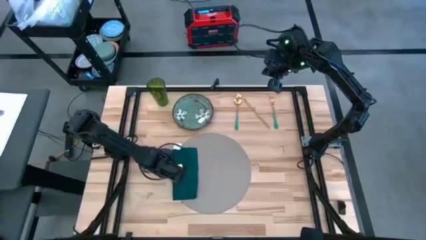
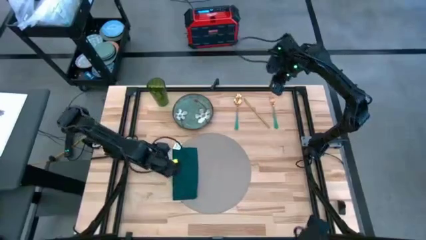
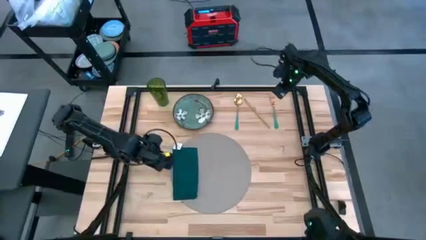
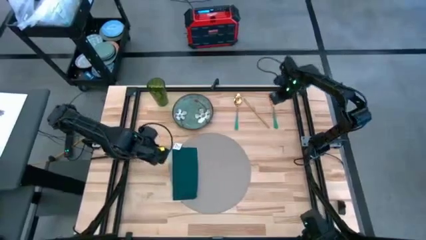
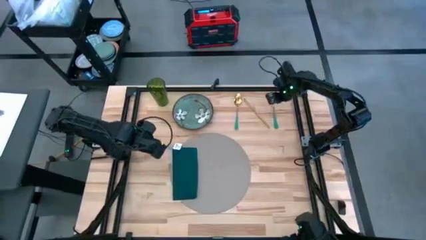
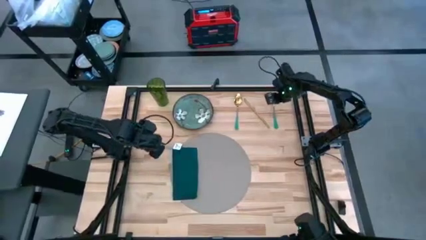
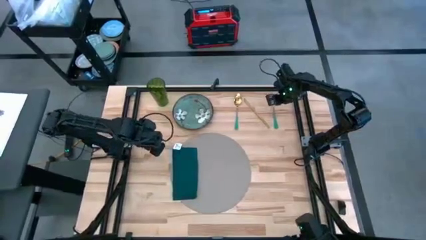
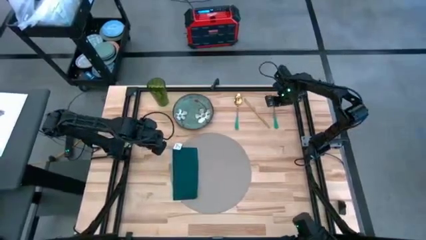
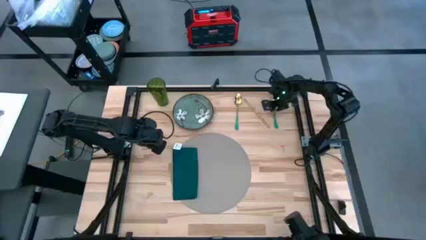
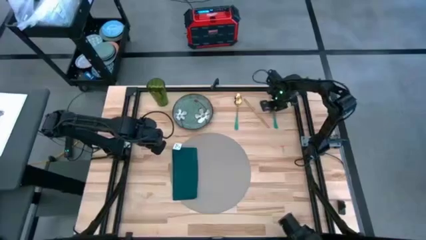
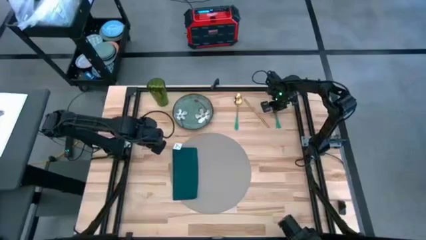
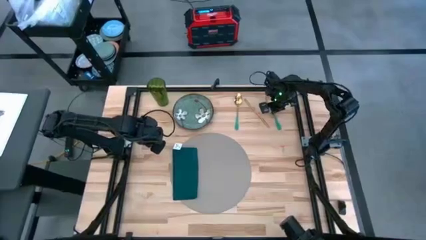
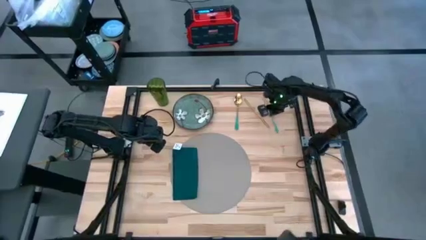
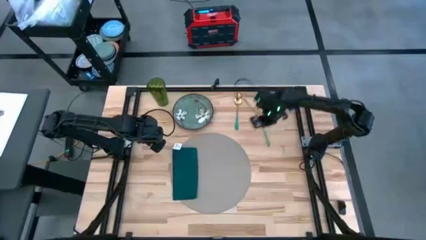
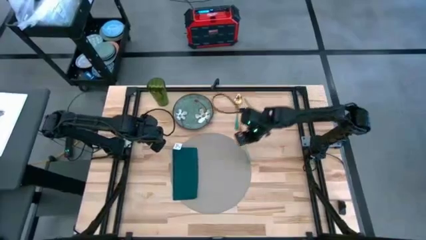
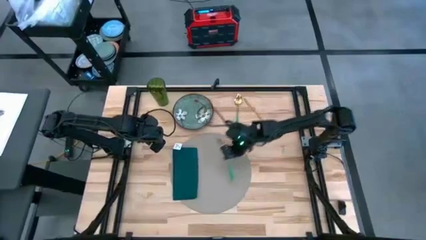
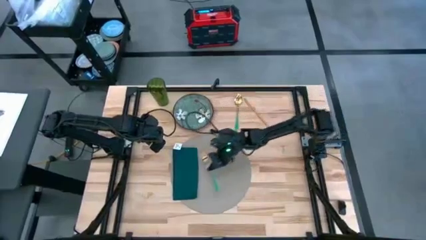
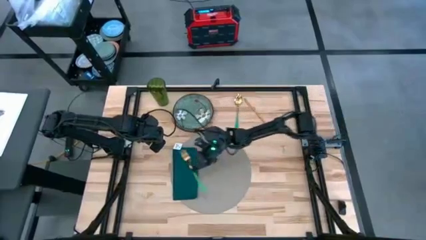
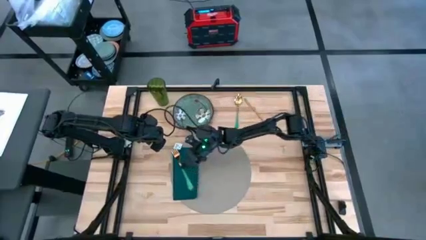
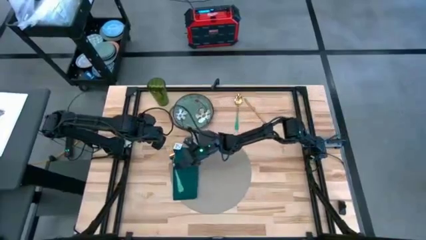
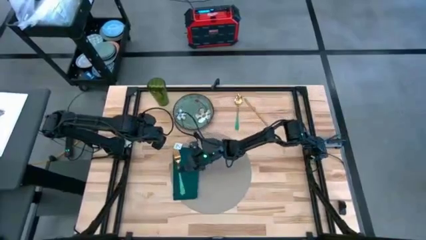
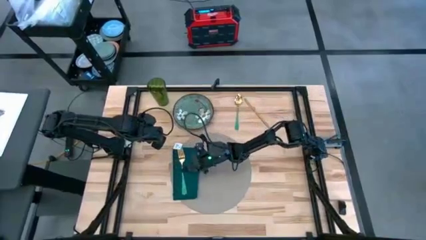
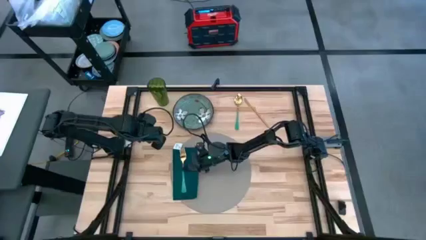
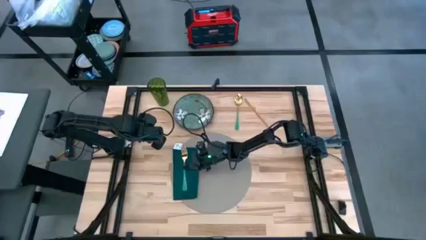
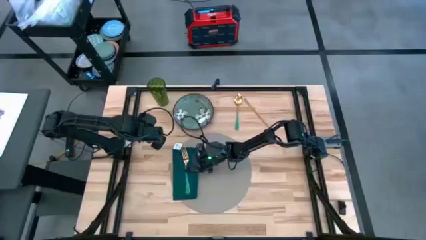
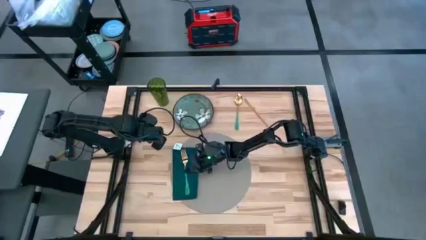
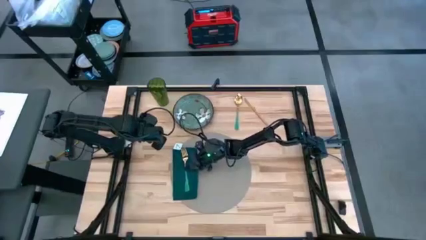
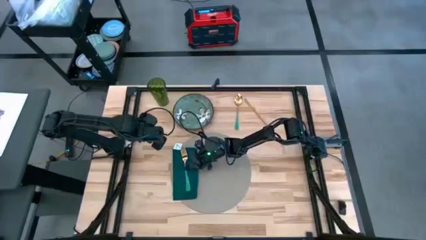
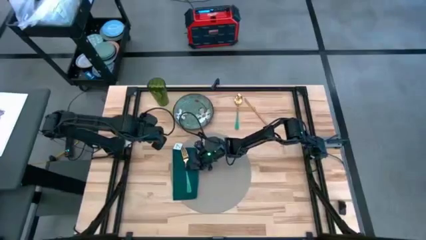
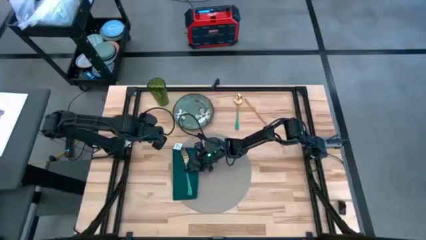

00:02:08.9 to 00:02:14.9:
Task: Set table place
Put the green fork on the green napkin

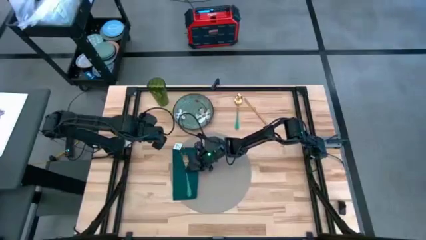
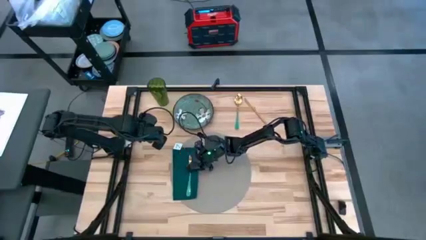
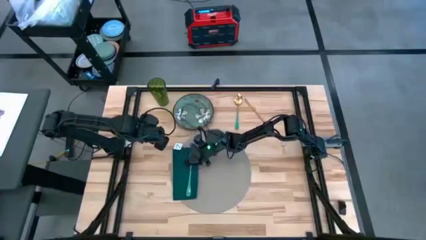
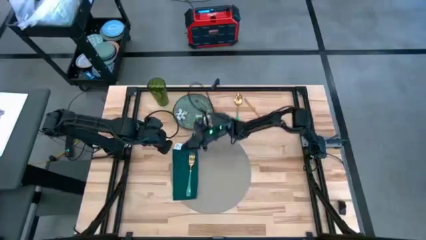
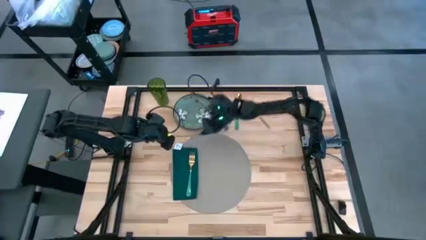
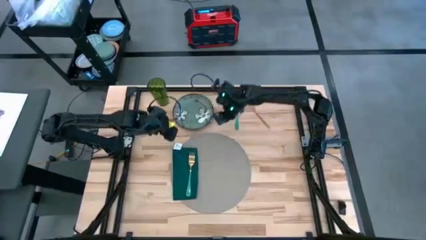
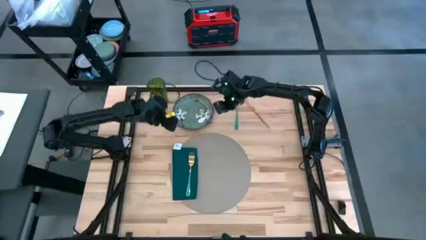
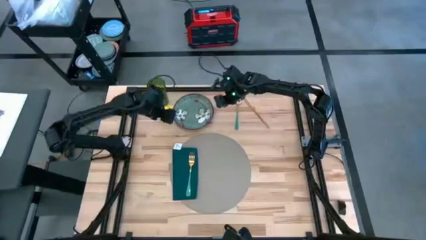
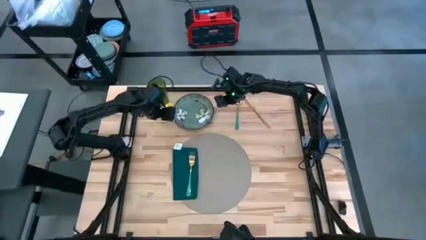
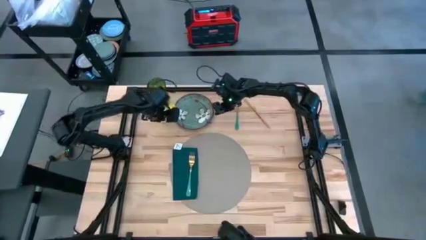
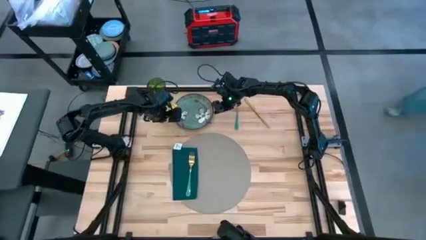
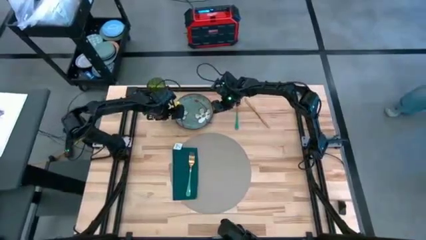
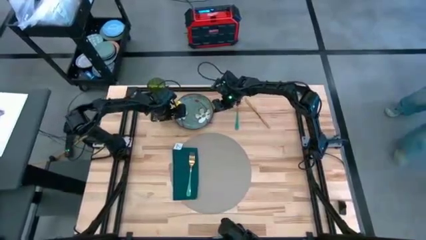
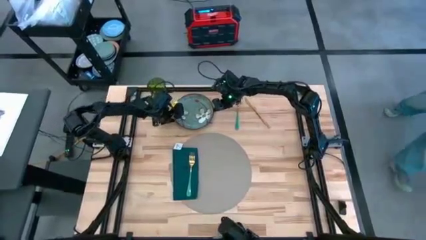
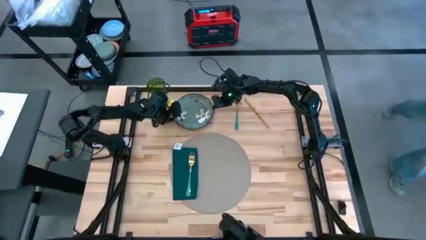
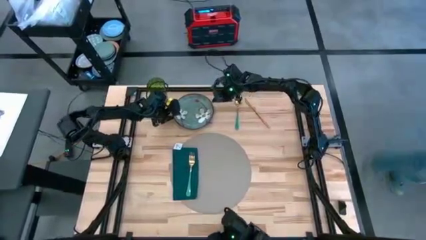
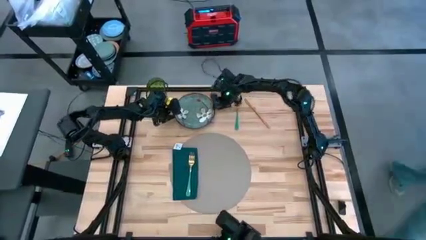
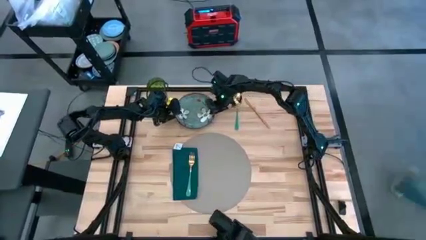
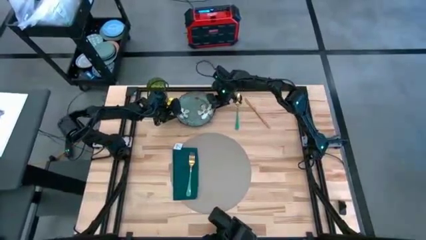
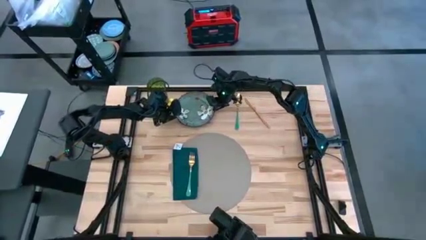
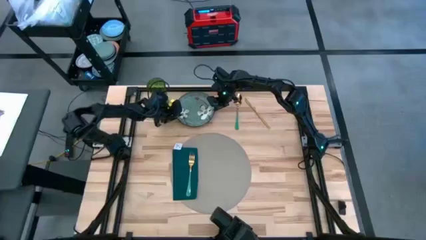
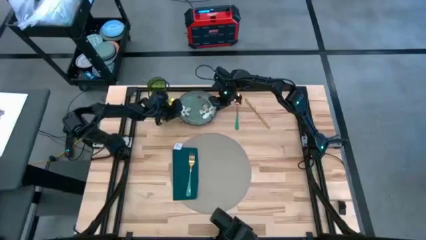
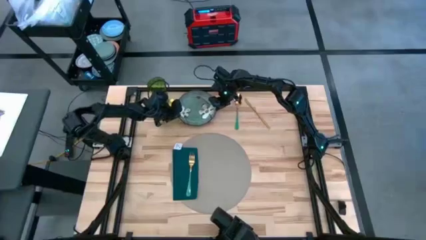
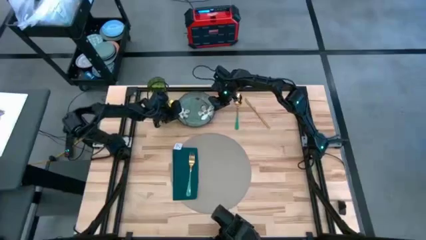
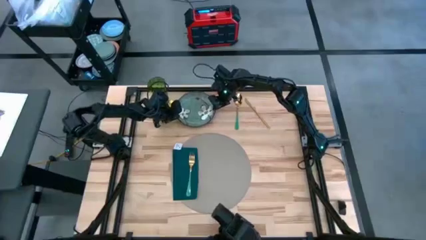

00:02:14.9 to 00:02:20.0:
Put the green plate on the gray table mat

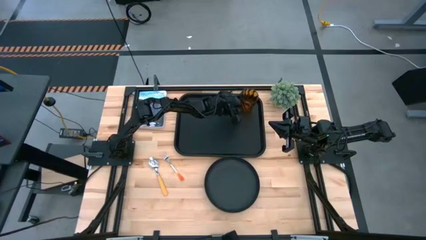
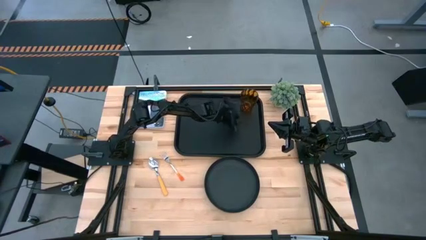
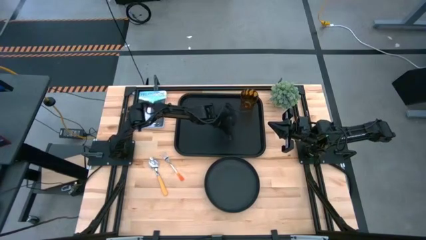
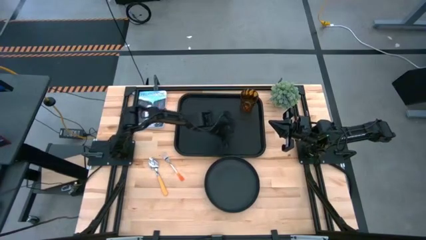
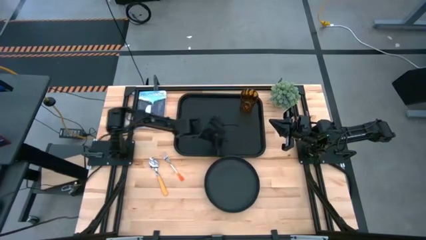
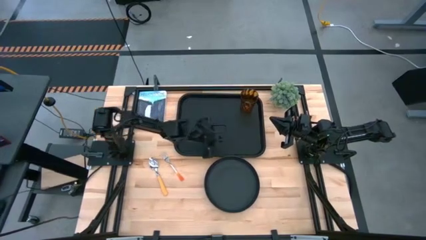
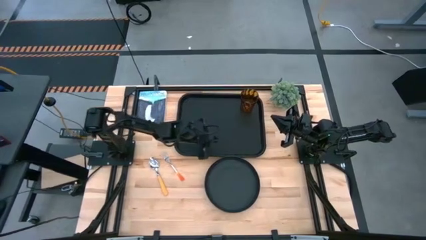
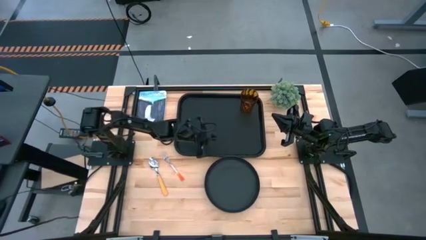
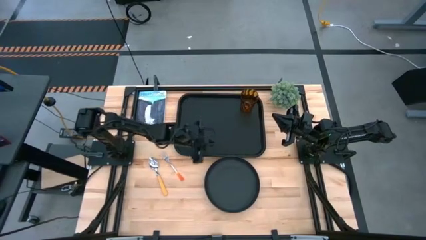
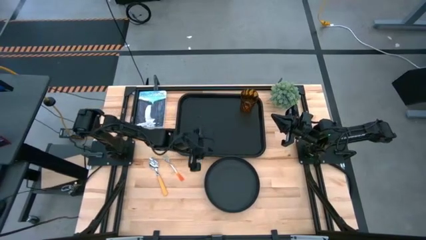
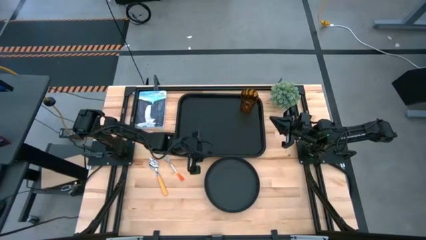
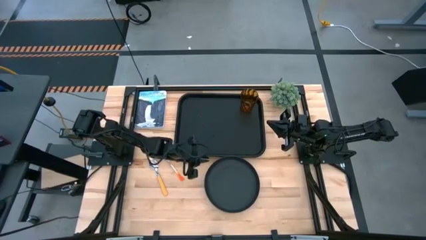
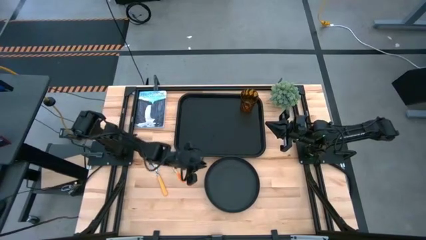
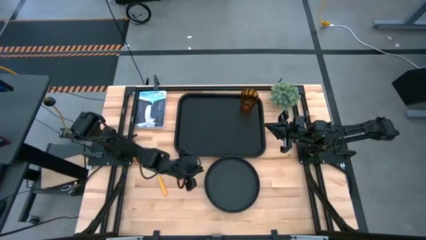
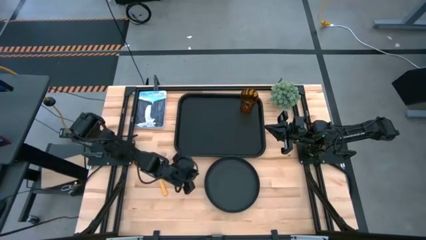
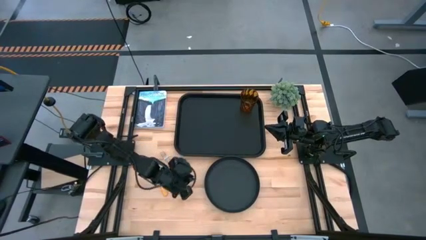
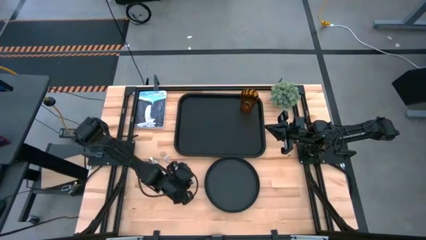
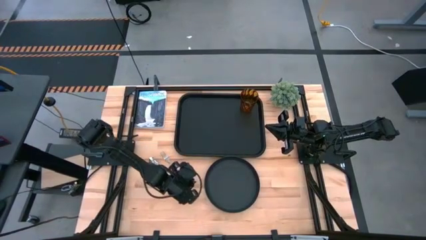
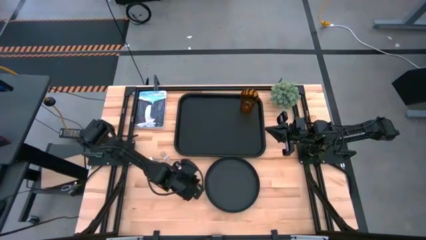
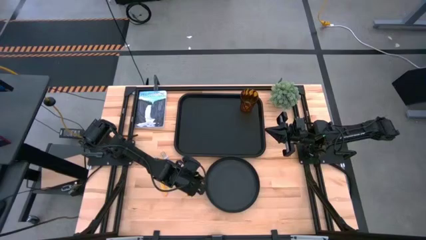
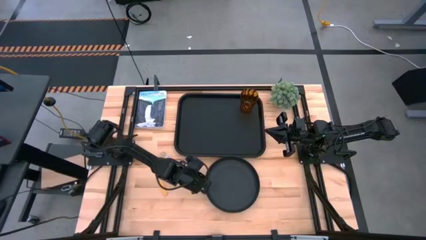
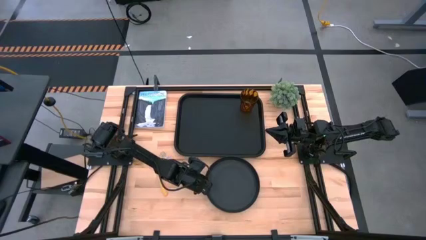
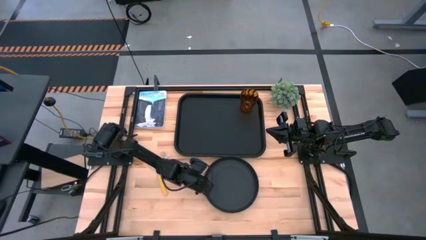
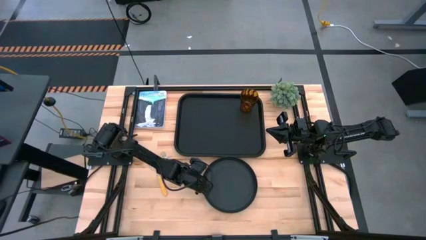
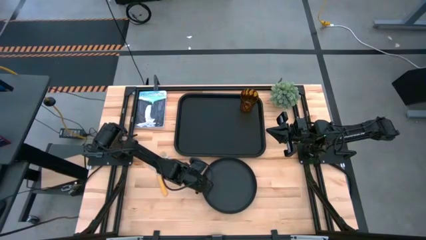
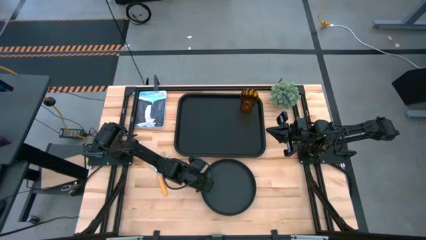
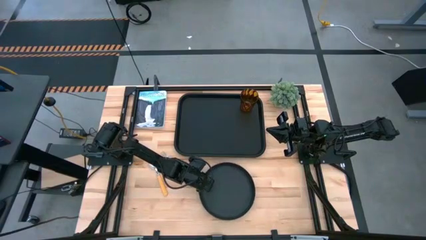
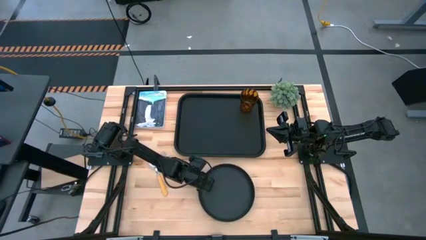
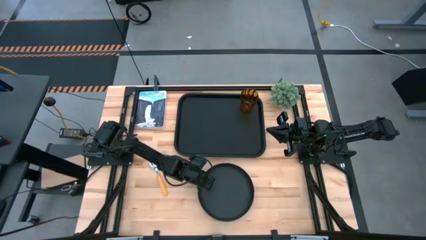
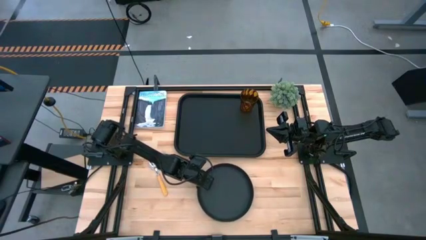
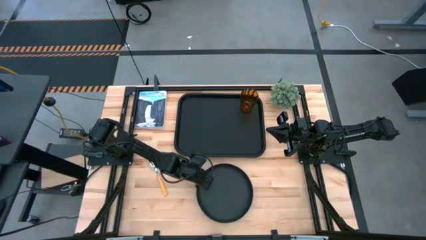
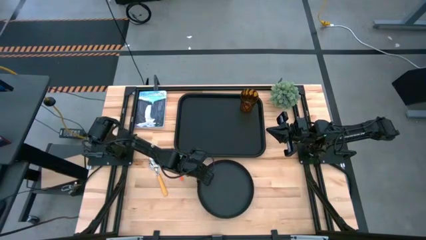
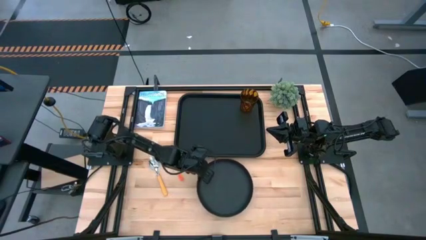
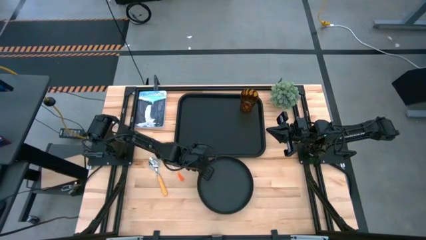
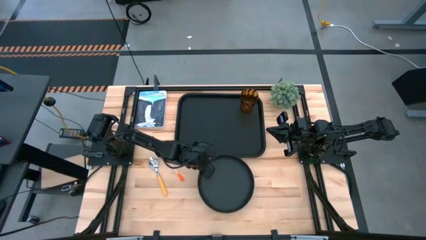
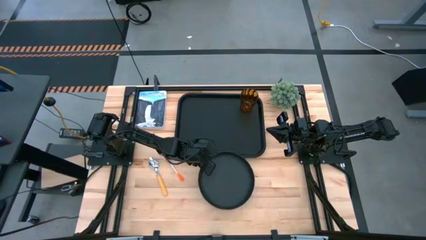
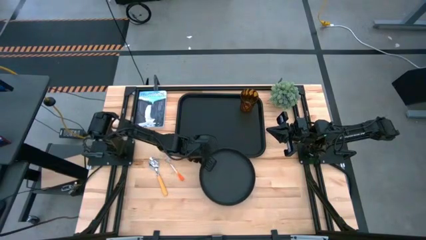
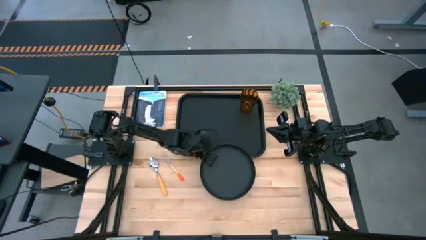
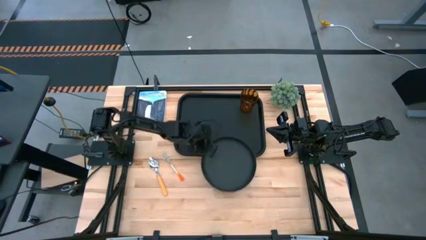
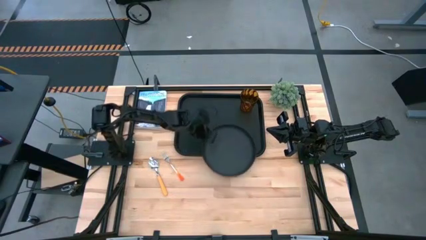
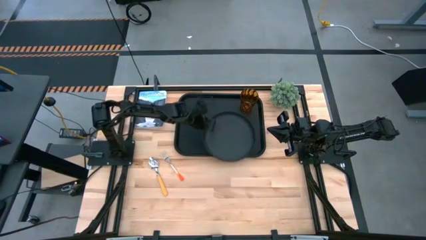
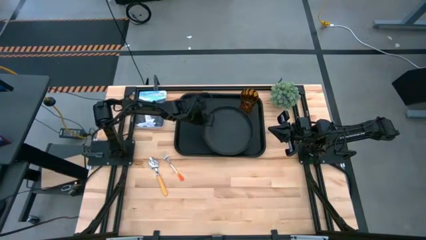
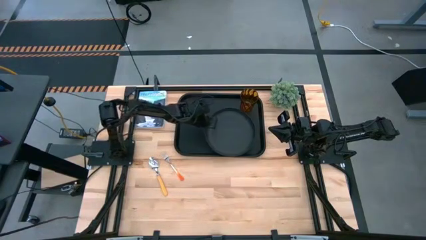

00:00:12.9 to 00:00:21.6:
Task: Pick and place plate/cup/fork/spoon on tray
Put the black plate on the right side of the black serving tray
